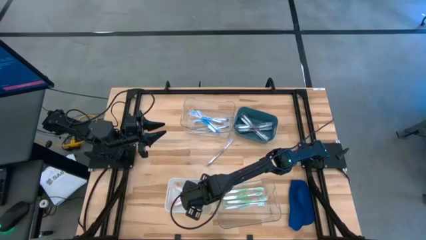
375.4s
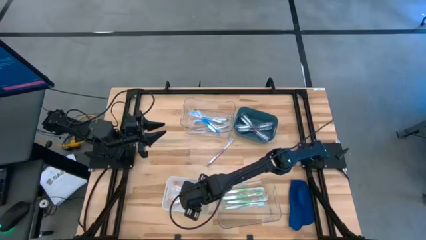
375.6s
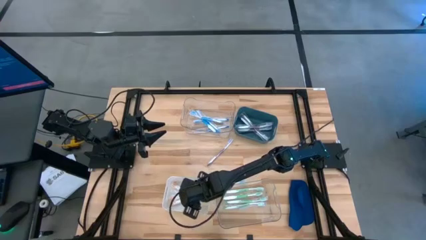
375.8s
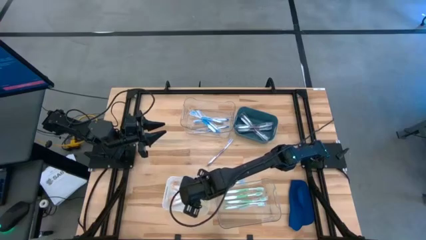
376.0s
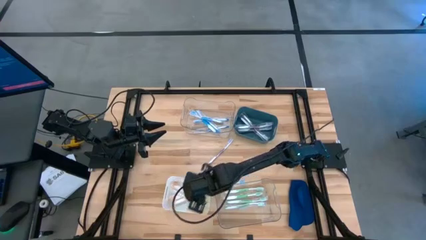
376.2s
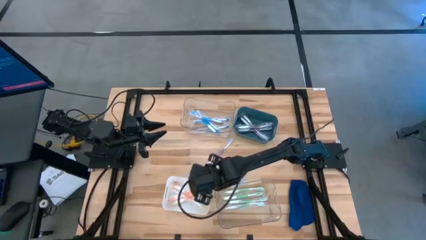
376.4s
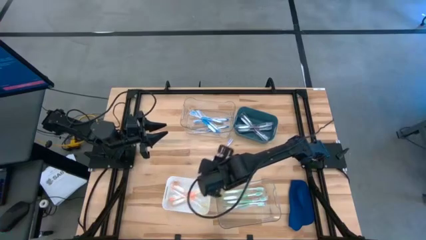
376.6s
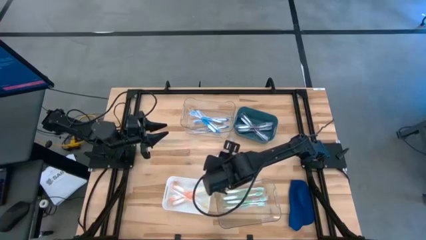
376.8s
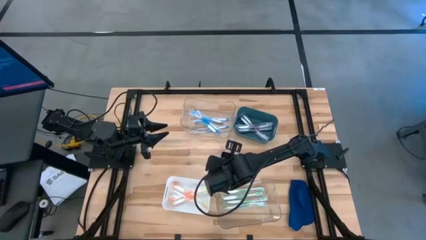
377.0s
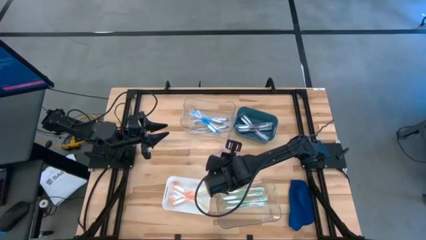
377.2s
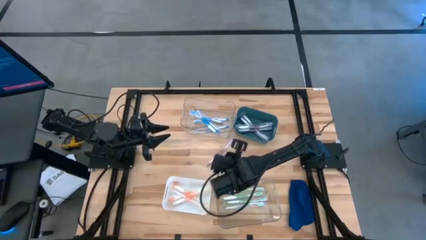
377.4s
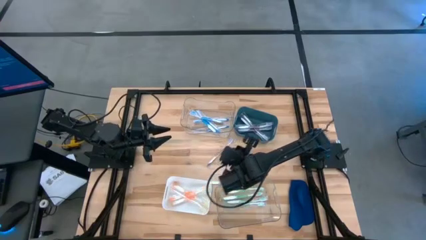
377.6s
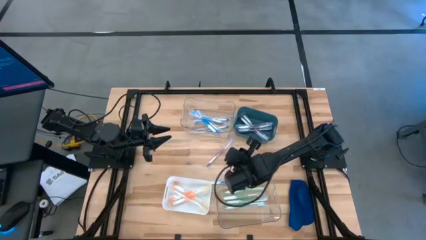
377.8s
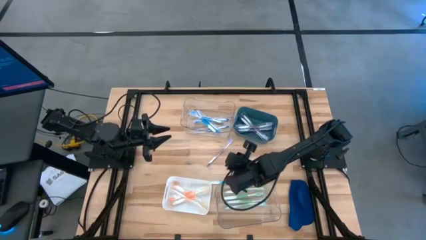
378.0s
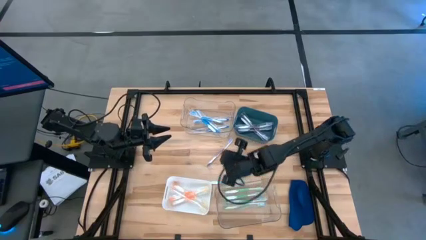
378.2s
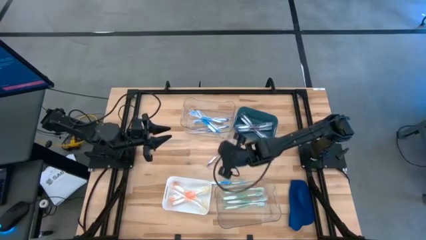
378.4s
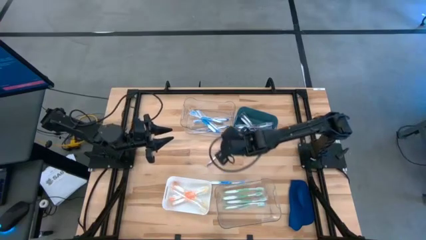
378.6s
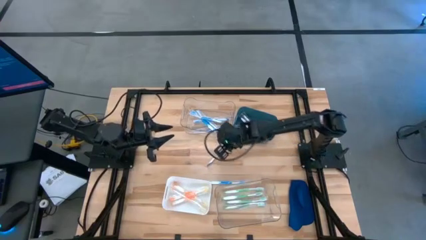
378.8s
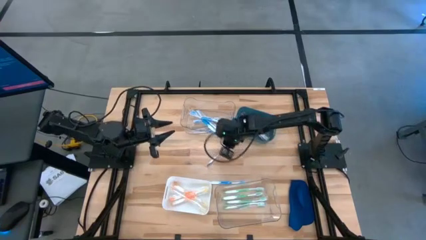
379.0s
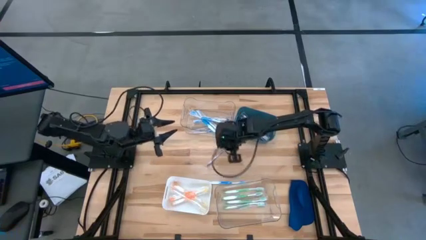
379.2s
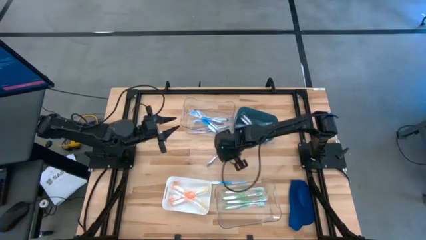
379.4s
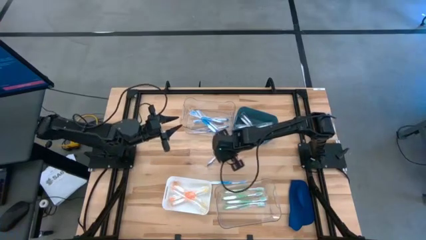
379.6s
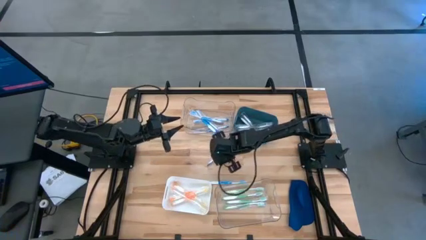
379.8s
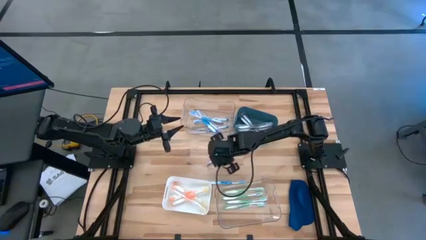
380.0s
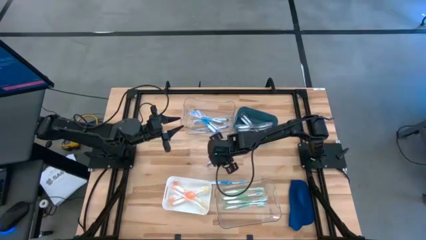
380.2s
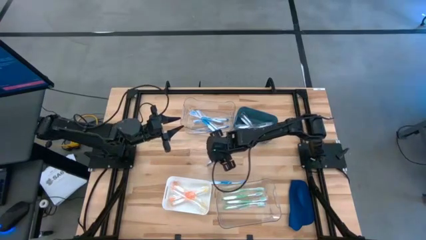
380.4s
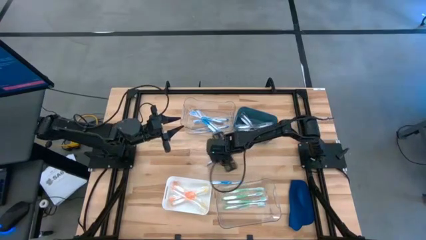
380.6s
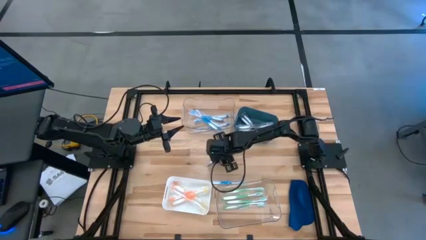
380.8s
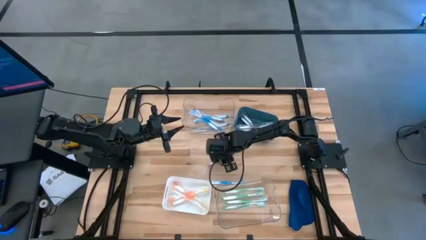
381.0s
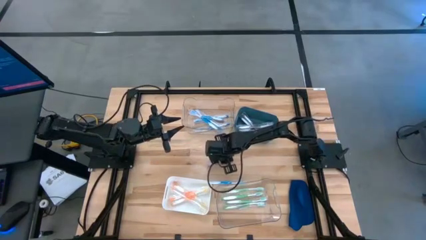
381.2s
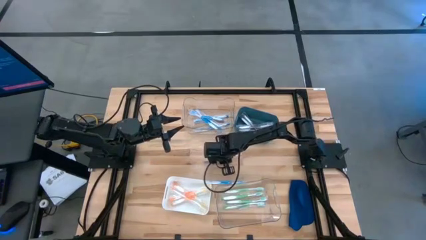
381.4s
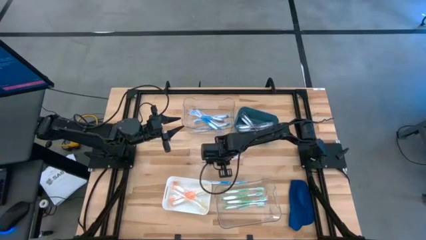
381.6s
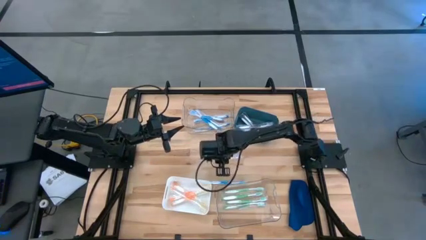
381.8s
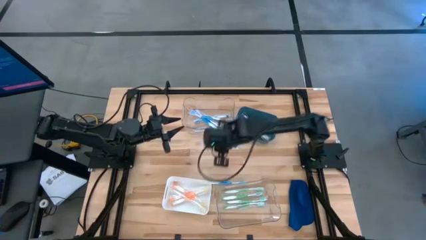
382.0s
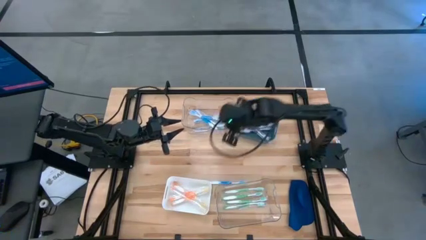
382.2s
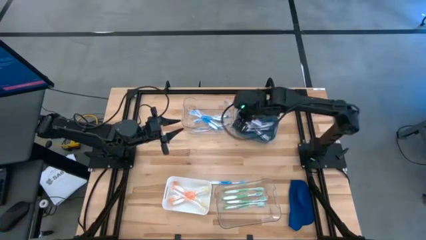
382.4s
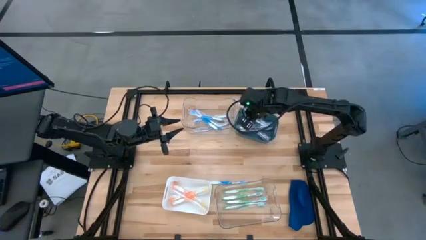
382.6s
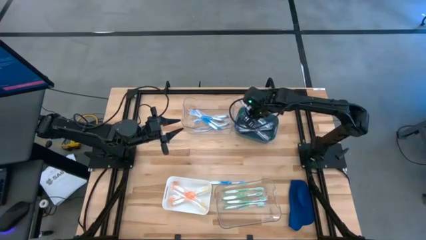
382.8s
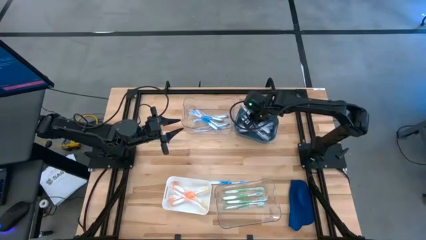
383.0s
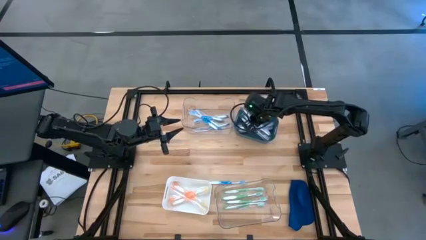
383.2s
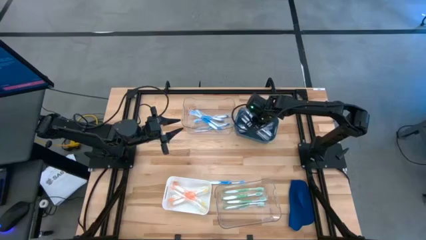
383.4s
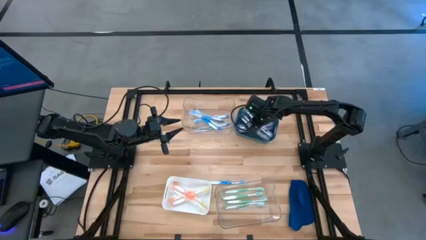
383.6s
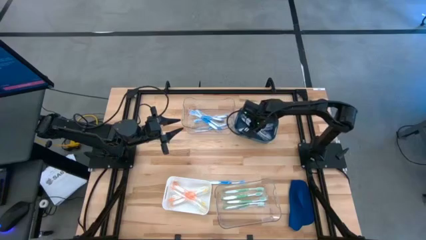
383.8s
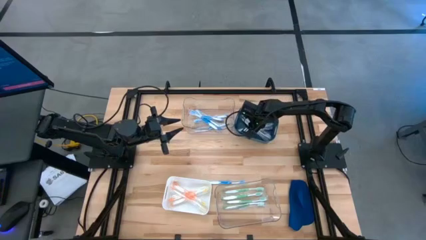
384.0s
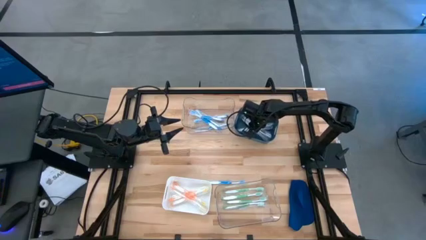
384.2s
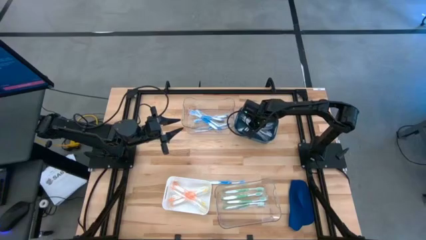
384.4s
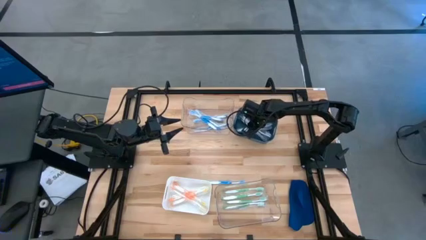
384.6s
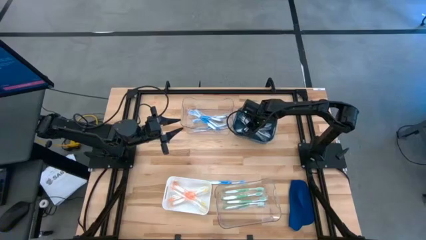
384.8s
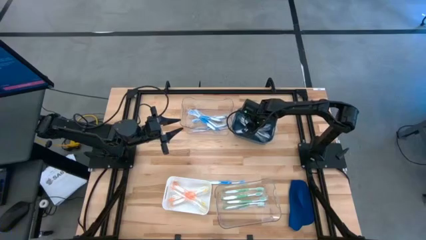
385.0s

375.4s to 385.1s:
Task: Pick & Place Toothbrushes
Put the purple toothbrush into the green bin
